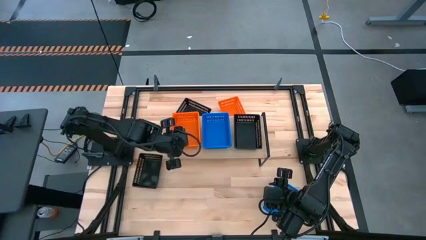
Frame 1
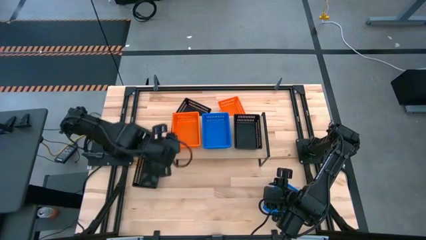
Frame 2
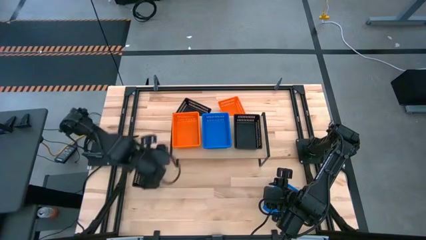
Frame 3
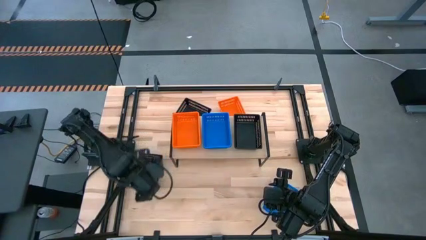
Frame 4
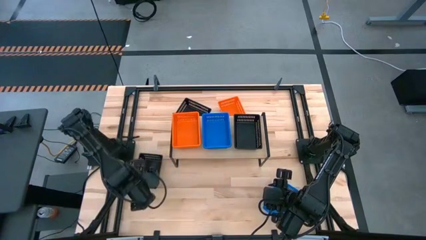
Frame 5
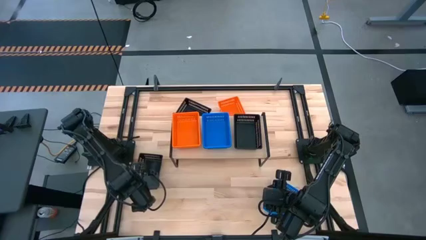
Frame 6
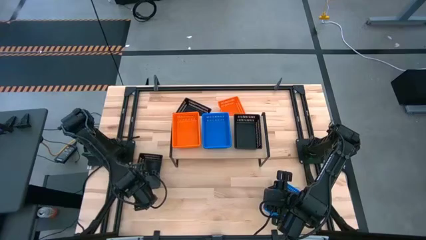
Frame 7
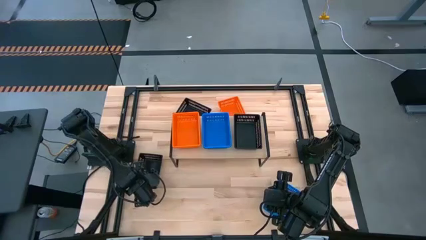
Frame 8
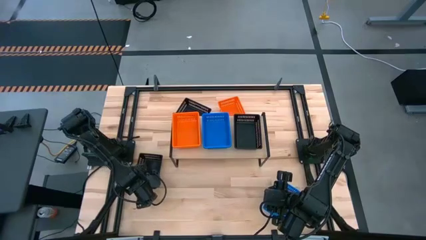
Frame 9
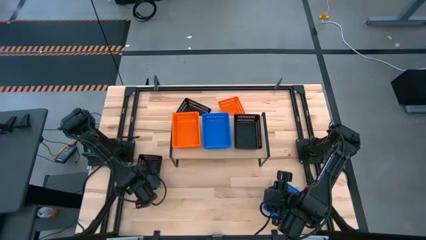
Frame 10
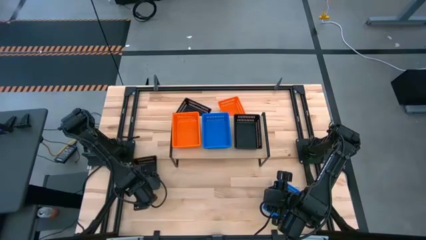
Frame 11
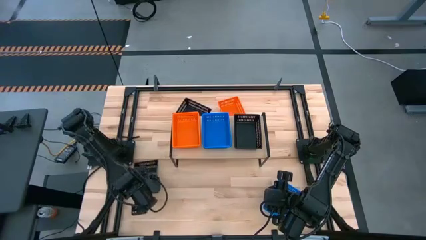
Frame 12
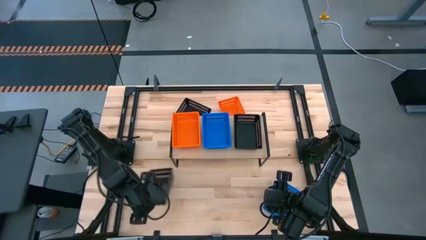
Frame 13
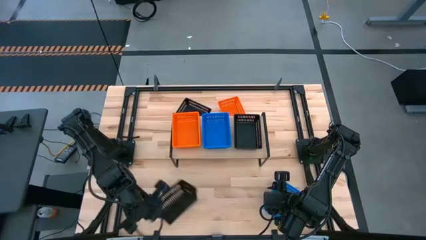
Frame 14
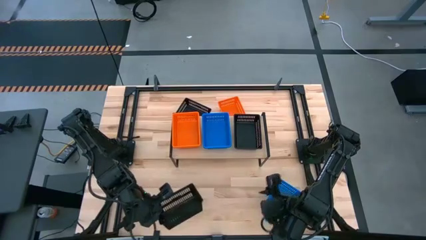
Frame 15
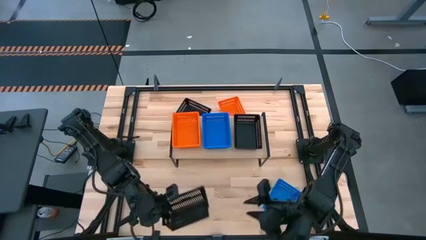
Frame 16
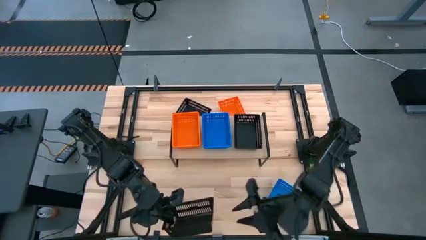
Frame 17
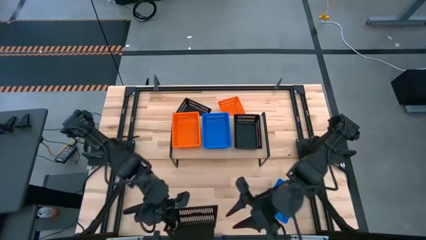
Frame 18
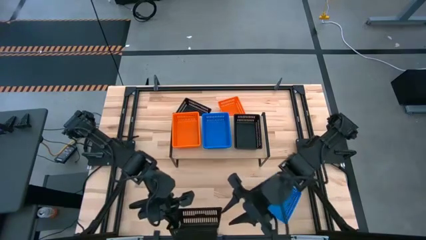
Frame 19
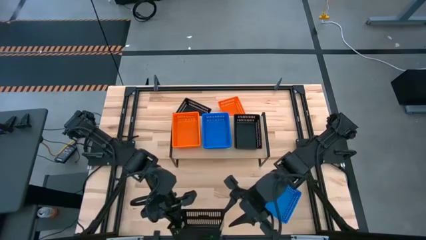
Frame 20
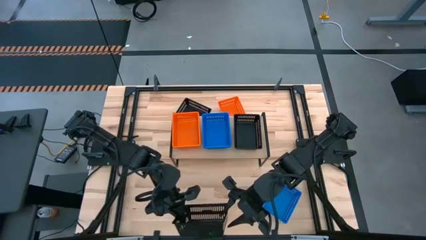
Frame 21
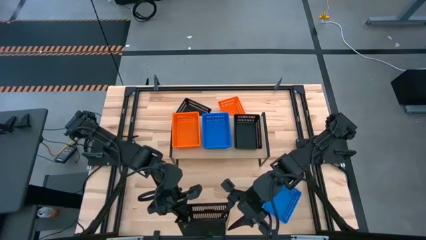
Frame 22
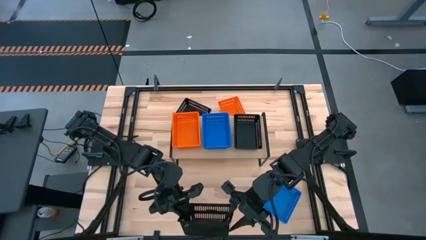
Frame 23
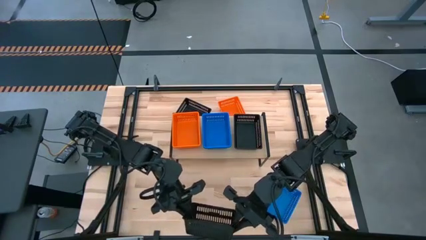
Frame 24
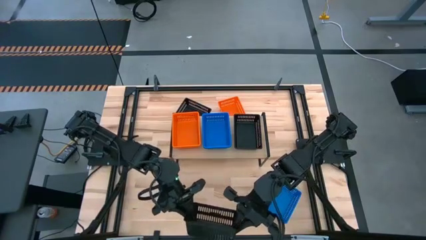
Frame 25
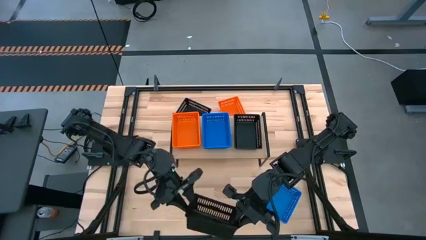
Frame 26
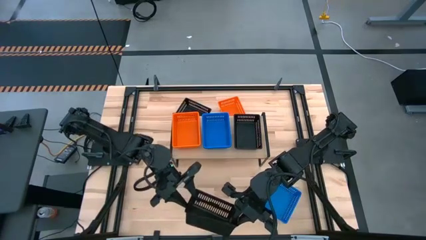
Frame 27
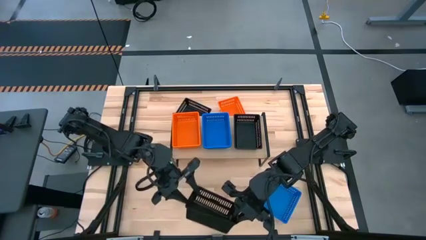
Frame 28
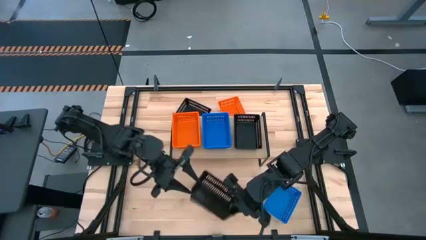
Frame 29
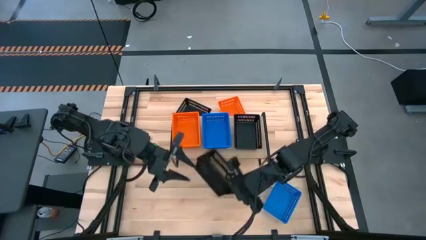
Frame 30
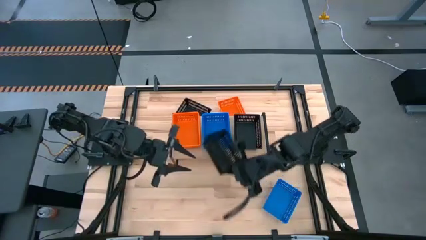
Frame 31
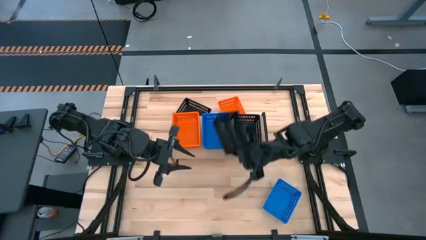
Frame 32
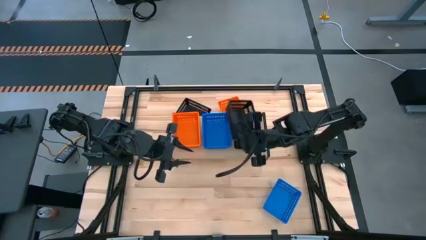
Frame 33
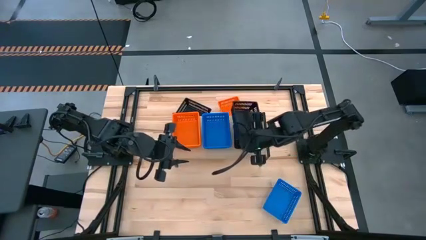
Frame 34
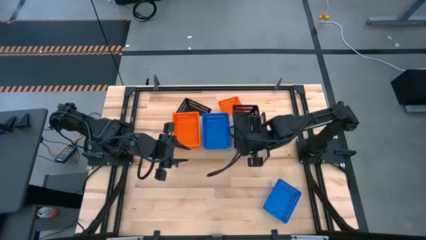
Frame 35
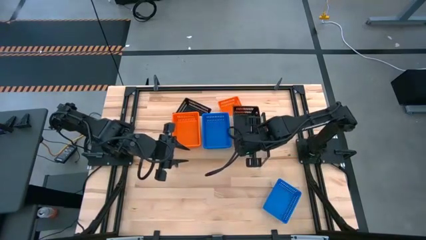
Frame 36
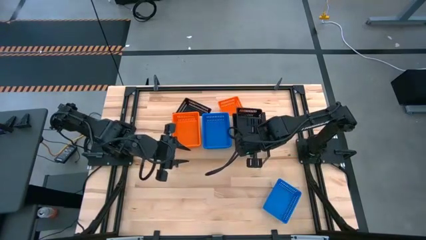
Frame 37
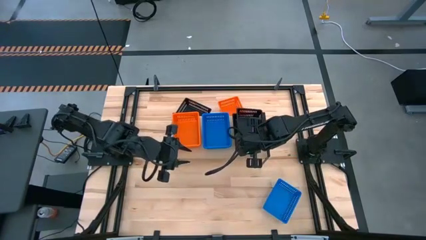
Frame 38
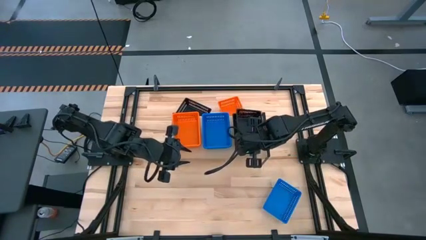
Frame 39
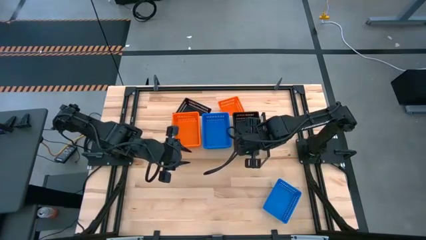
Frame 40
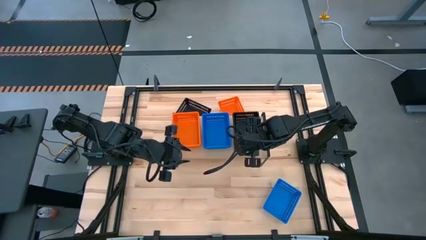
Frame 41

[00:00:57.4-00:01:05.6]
Task: Stack baskets on shelf by color
Stack the bottom black bin on top of the black bin on the shelf

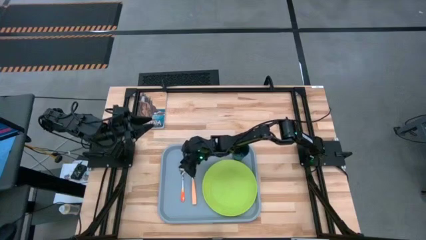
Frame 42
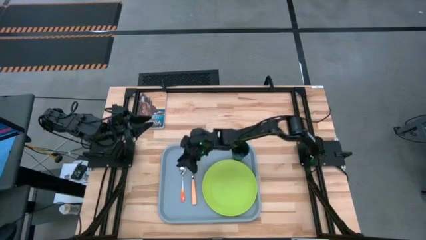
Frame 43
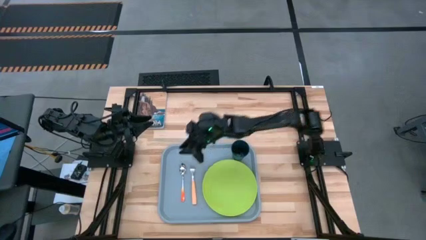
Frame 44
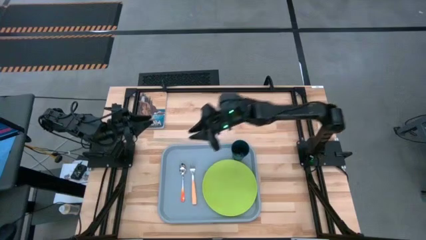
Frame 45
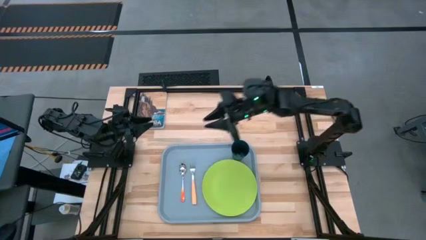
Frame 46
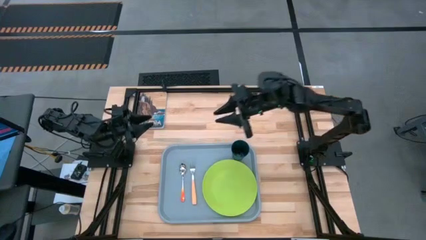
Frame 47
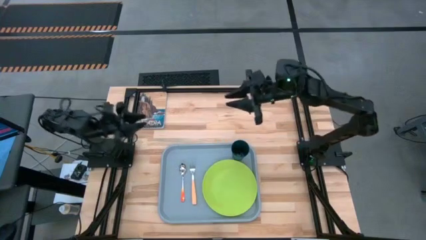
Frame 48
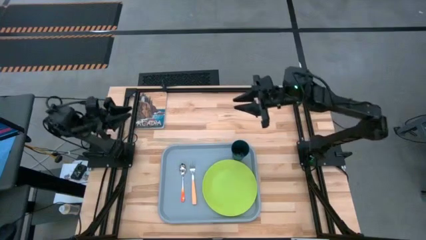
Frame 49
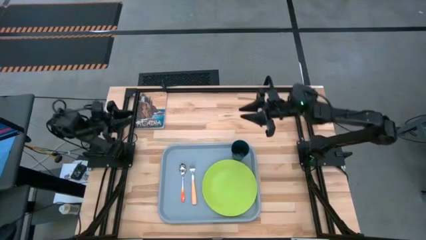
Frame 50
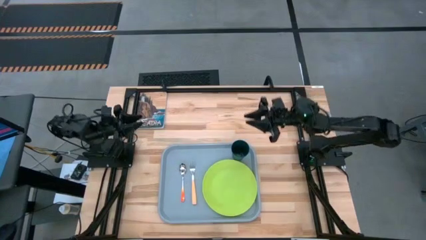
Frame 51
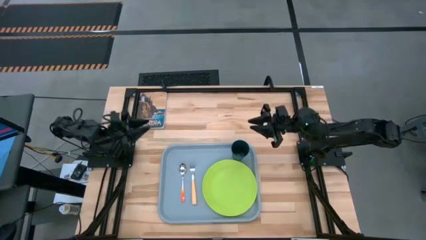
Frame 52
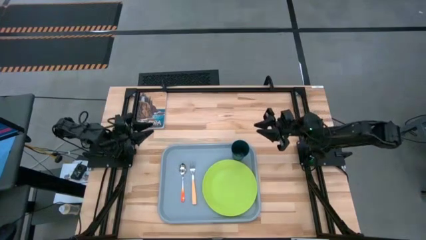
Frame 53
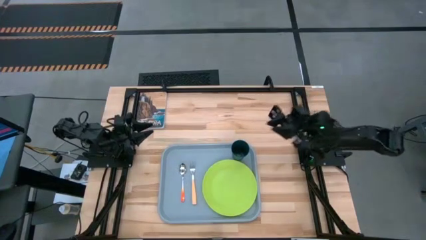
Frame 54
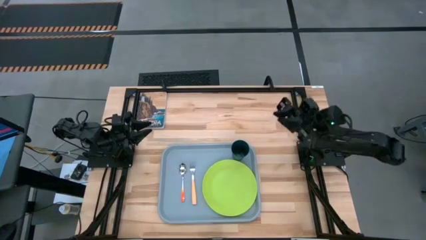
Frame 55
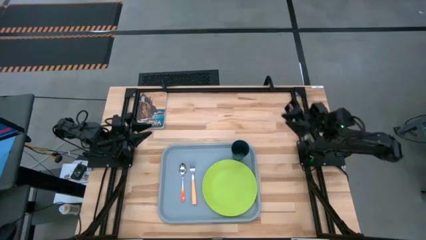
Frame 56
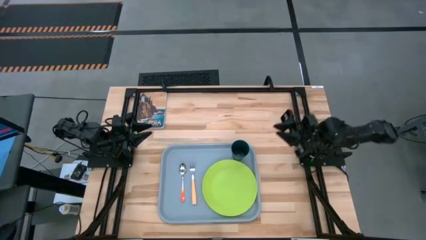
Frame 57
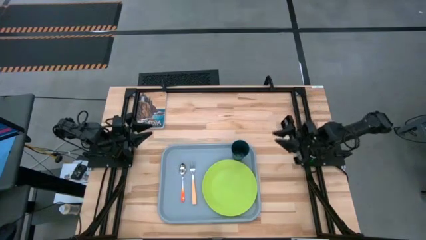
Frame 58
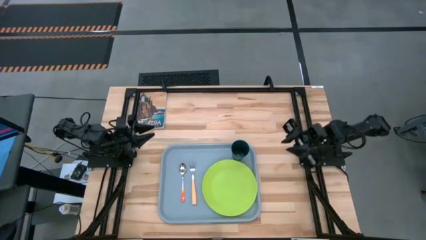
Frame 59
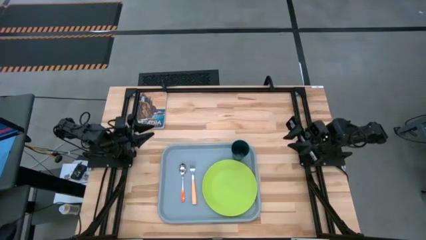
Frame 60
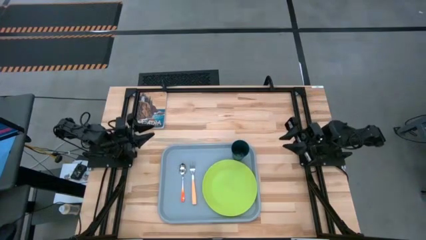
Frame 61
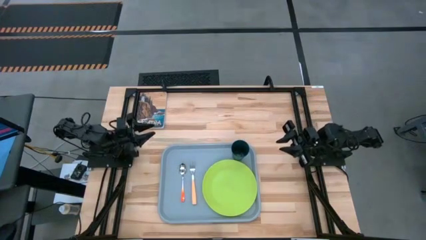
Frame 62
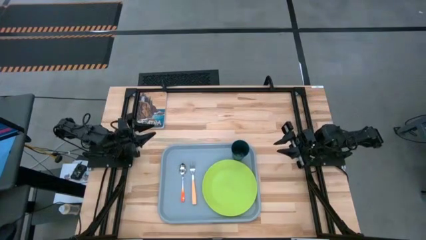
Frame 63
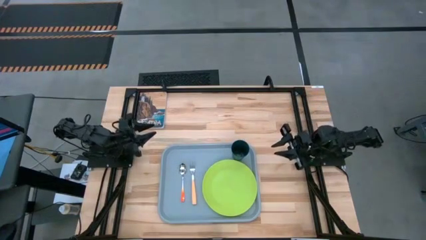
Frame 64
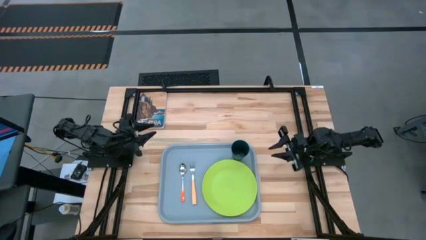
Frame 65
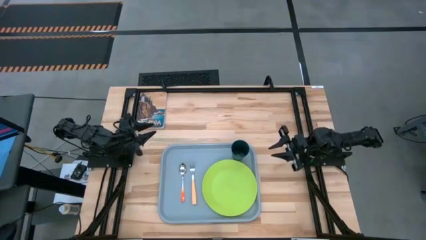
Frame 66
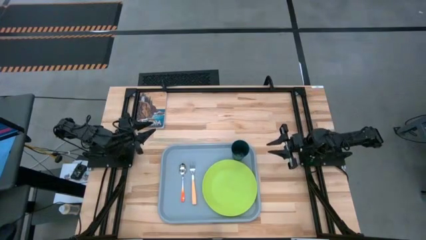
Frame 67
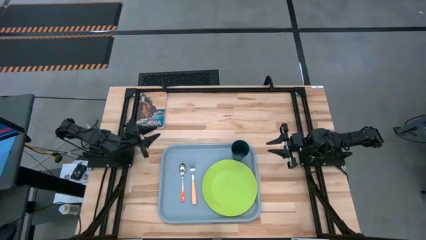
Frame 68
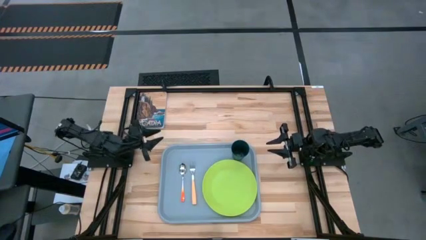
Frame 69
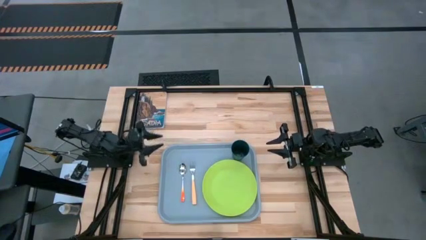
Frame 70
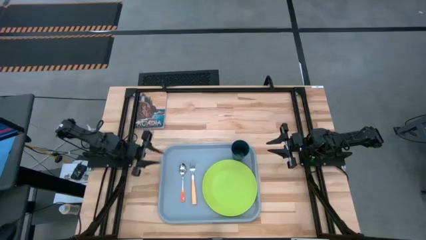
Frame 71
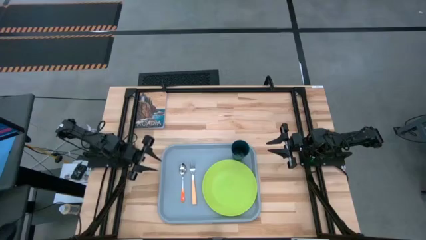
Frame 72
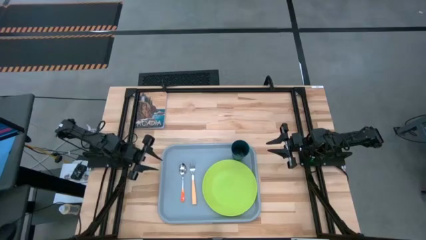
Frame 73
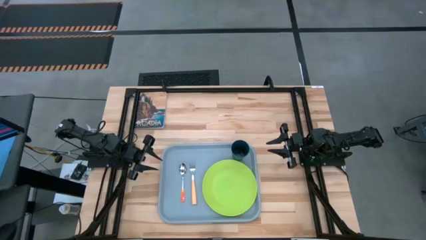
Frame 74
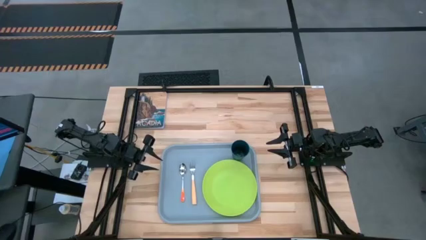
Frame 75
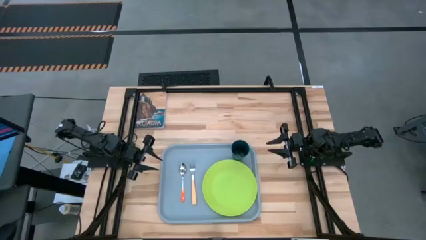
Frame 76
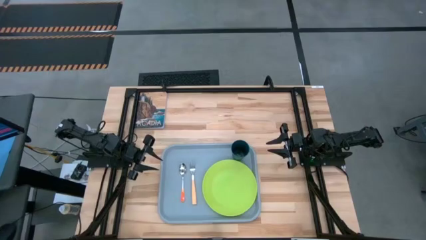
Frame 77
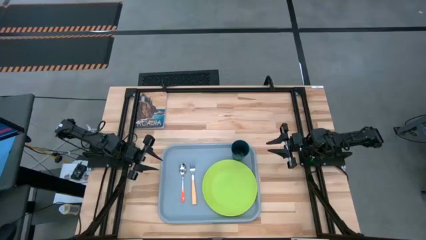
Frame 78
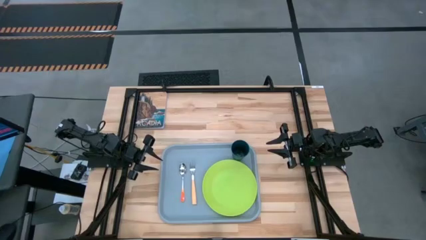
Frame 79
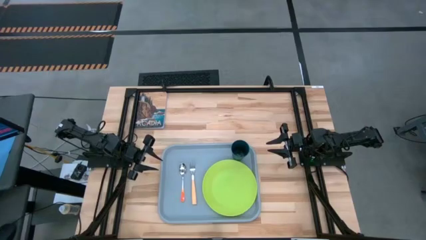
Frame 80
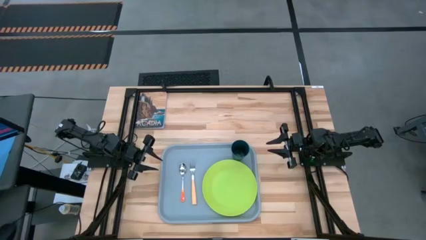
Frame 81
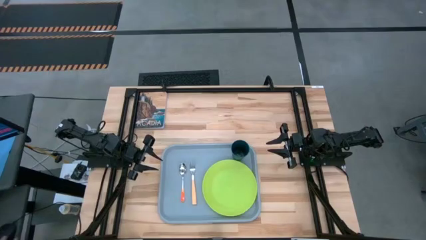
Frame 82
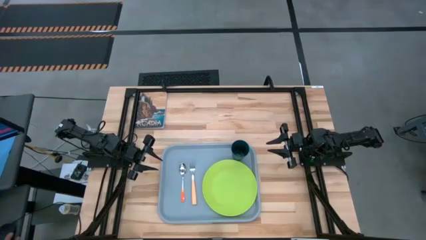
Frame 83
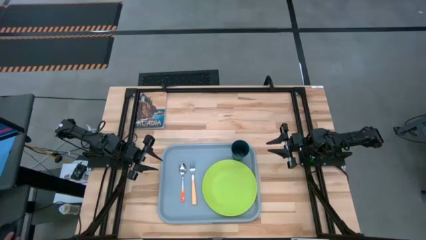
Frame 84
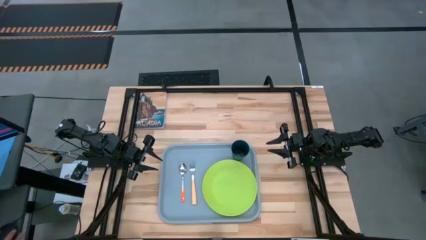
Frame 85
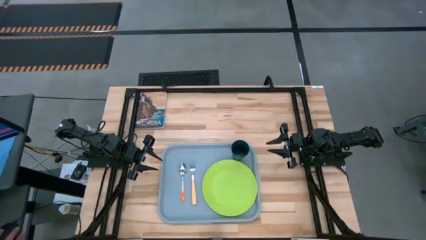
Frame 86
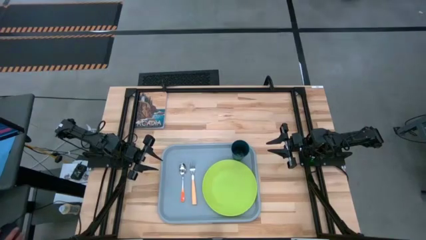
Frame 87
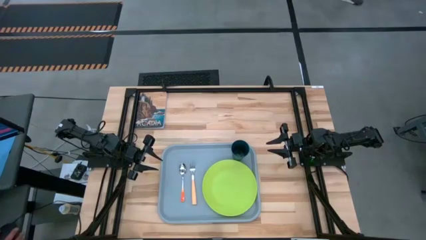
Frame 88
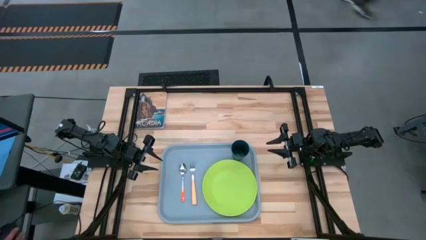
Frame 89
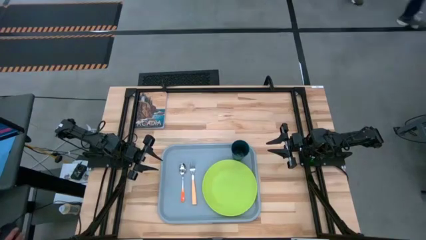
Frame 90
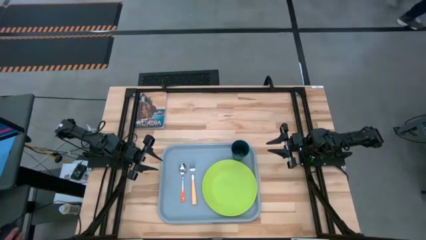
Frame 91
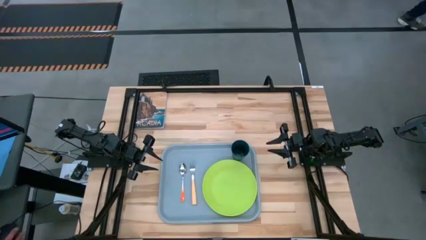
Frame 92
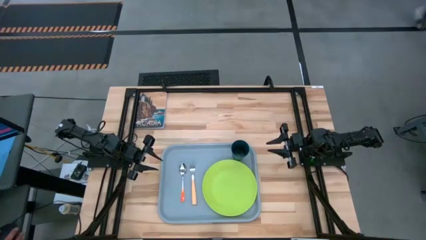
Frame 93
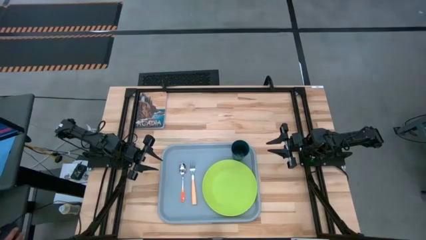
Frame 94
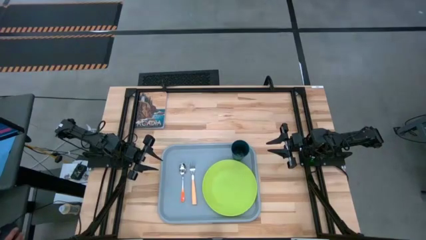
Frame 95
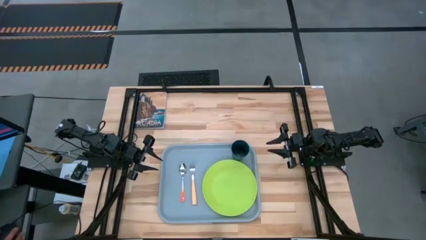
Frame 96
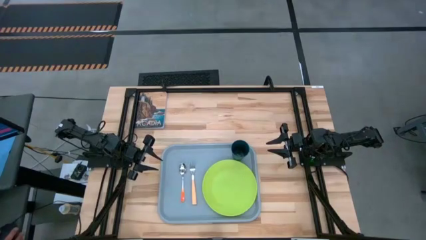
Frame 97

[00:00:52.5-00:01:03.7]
Task: Pick and place plate/cup/fork/spoon on tray
Return to Home Position
